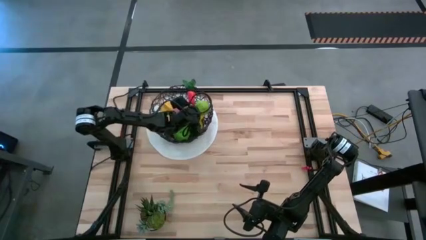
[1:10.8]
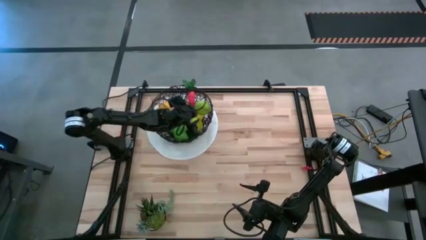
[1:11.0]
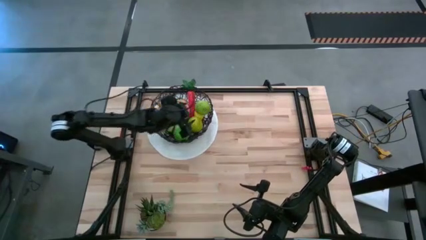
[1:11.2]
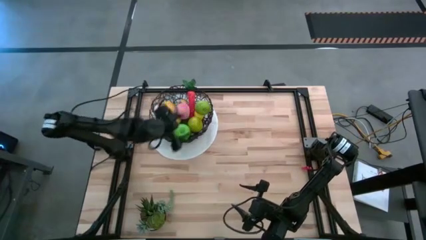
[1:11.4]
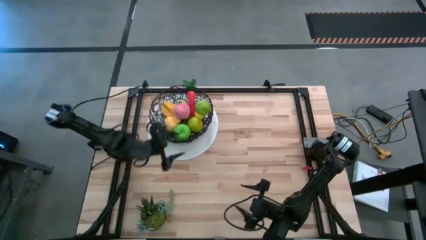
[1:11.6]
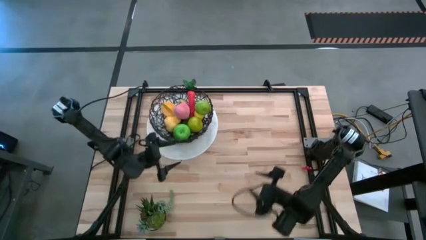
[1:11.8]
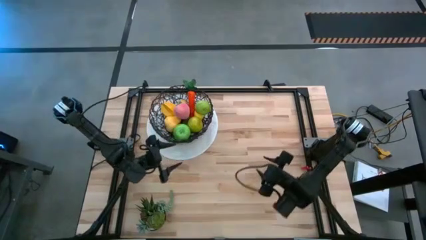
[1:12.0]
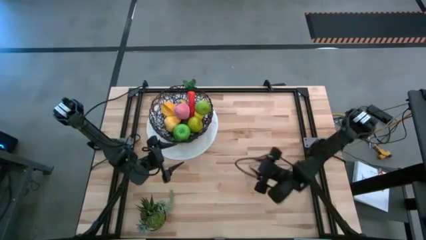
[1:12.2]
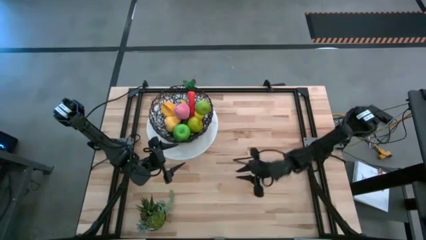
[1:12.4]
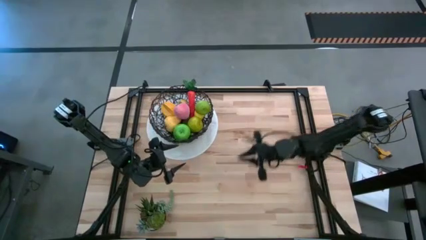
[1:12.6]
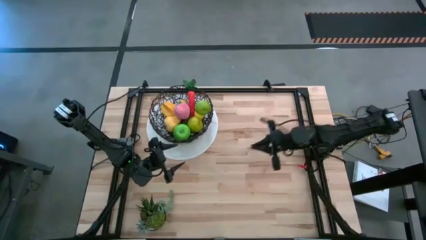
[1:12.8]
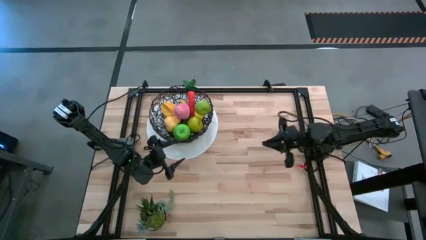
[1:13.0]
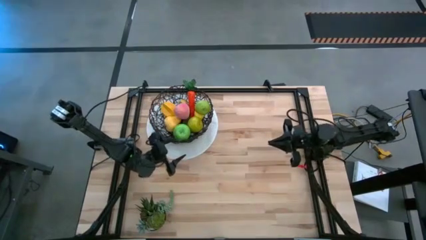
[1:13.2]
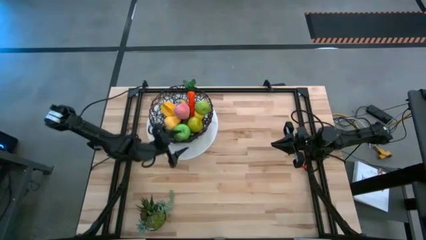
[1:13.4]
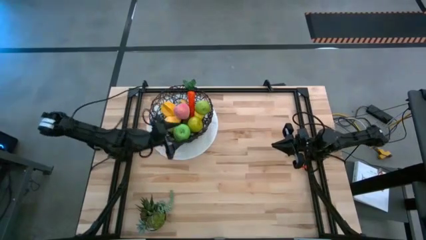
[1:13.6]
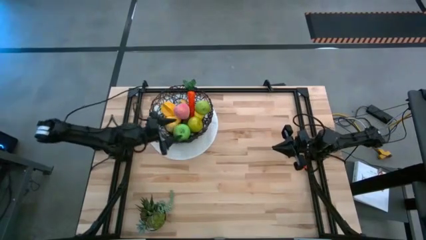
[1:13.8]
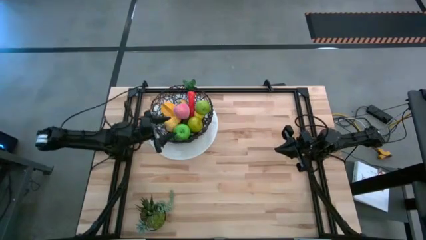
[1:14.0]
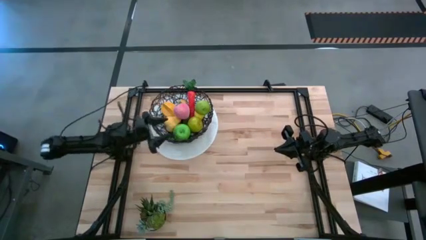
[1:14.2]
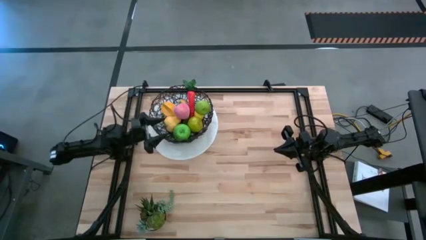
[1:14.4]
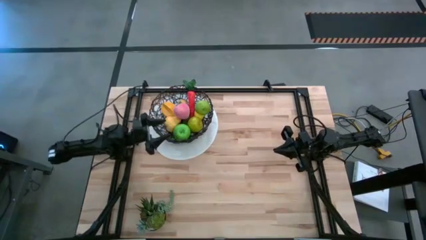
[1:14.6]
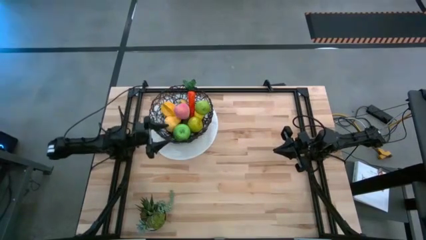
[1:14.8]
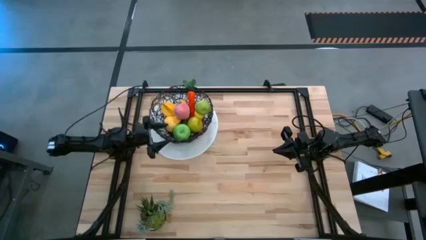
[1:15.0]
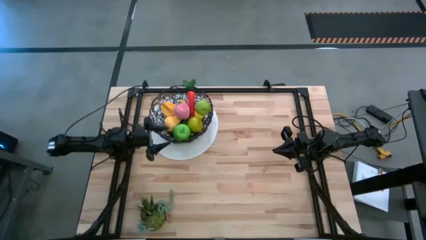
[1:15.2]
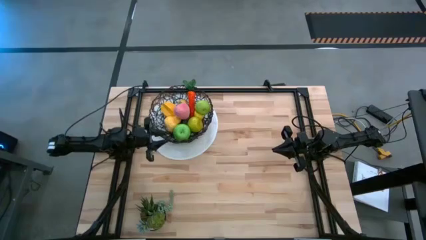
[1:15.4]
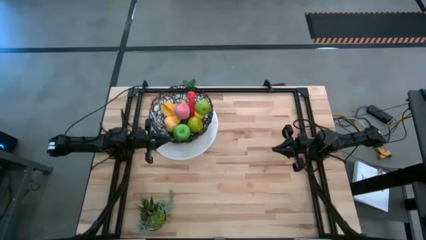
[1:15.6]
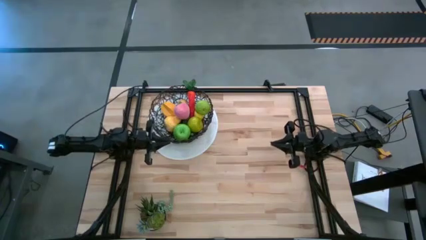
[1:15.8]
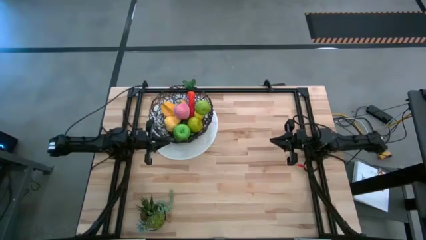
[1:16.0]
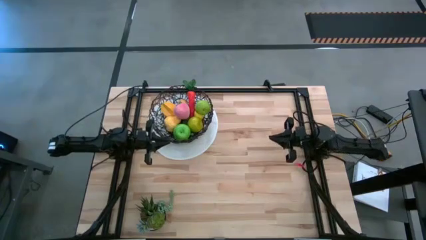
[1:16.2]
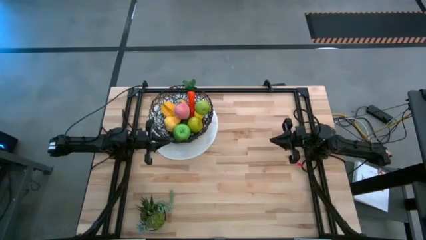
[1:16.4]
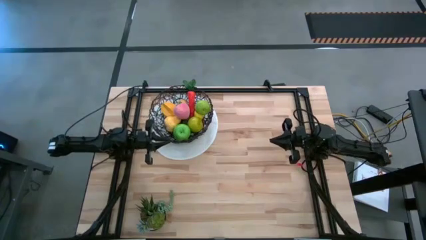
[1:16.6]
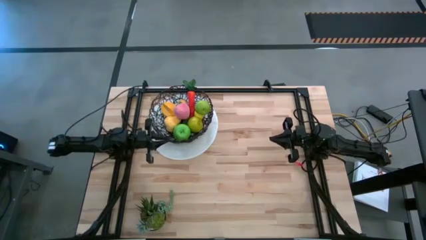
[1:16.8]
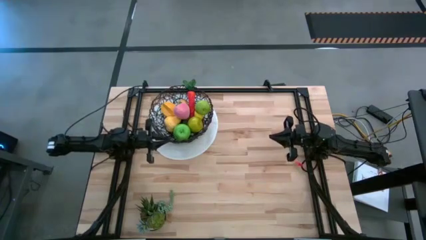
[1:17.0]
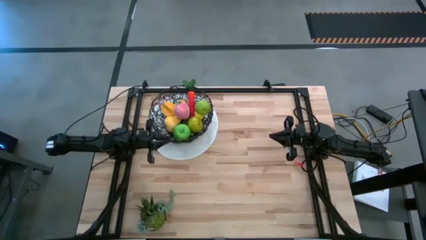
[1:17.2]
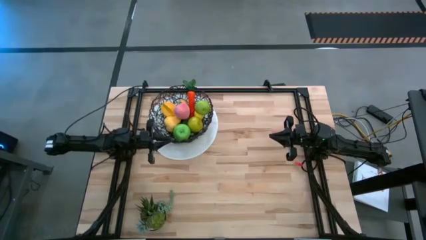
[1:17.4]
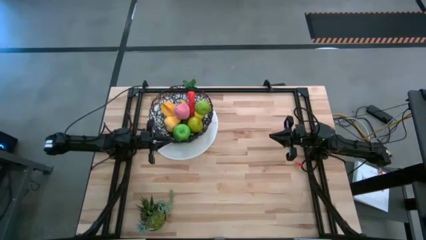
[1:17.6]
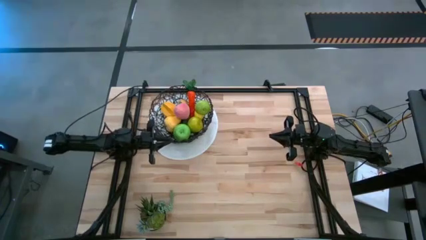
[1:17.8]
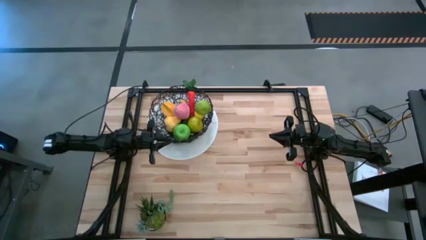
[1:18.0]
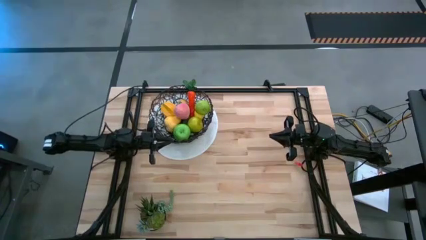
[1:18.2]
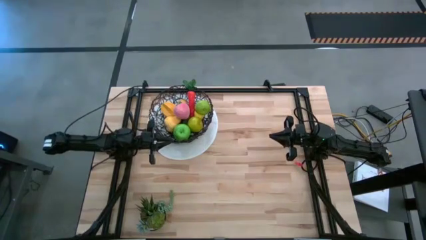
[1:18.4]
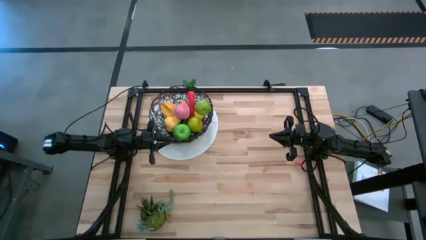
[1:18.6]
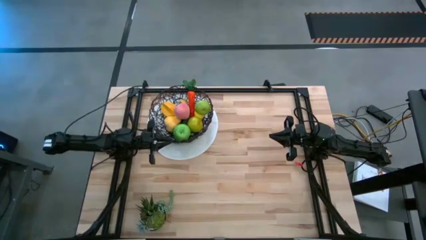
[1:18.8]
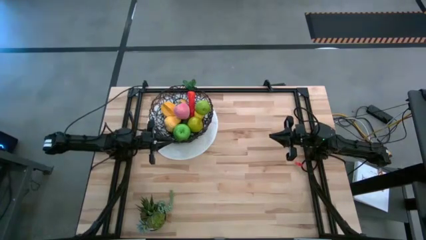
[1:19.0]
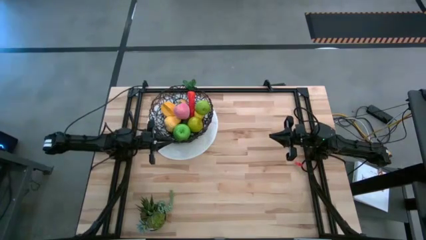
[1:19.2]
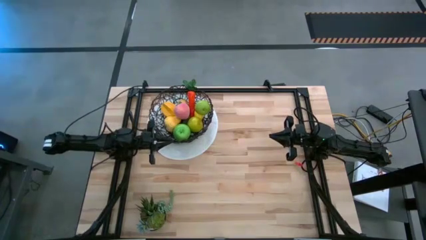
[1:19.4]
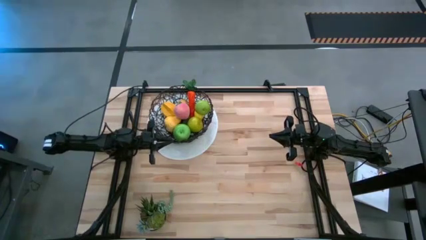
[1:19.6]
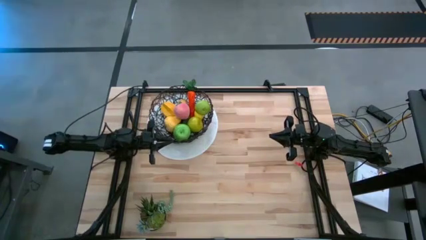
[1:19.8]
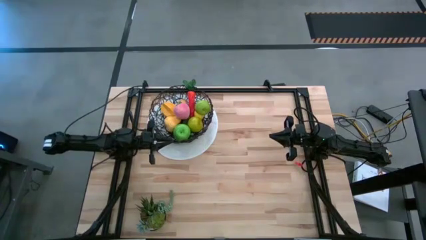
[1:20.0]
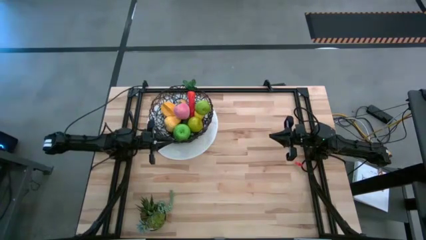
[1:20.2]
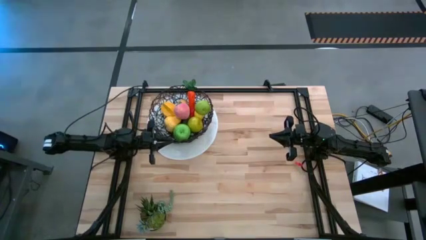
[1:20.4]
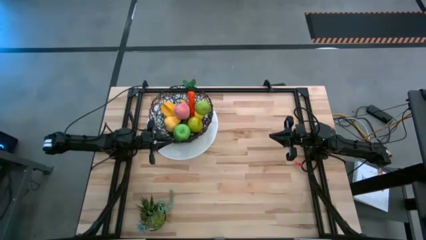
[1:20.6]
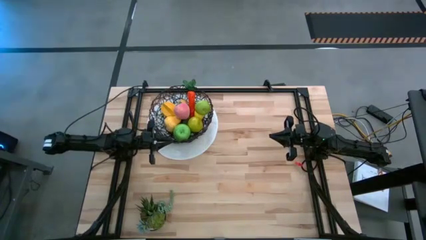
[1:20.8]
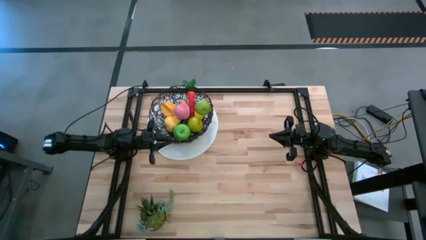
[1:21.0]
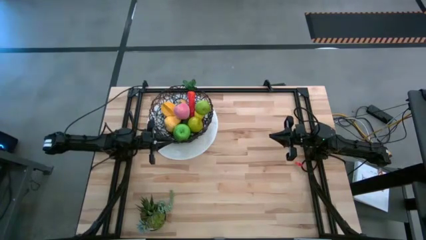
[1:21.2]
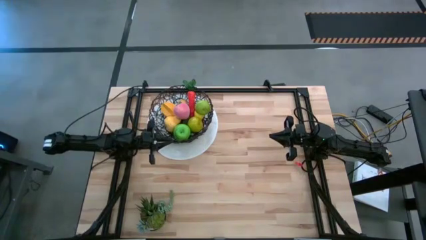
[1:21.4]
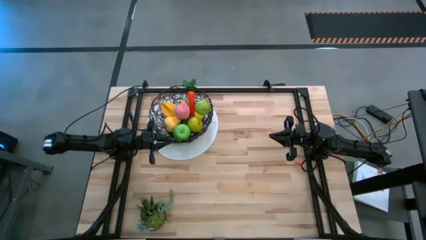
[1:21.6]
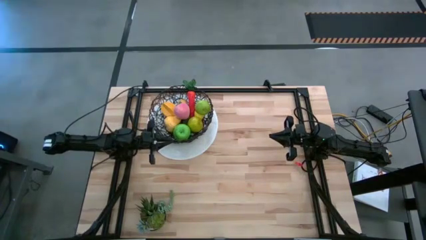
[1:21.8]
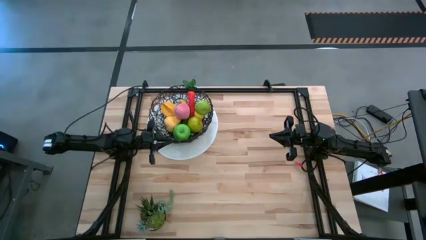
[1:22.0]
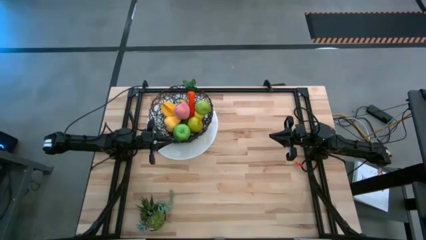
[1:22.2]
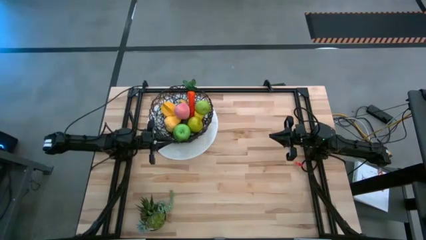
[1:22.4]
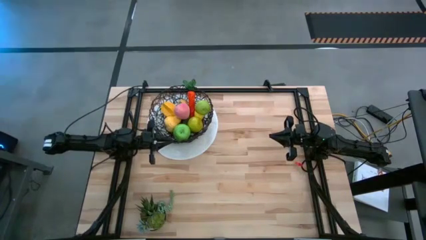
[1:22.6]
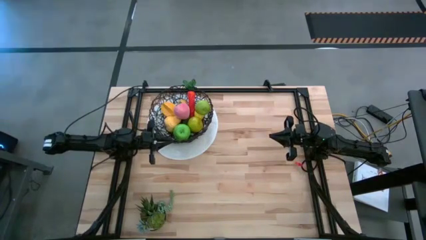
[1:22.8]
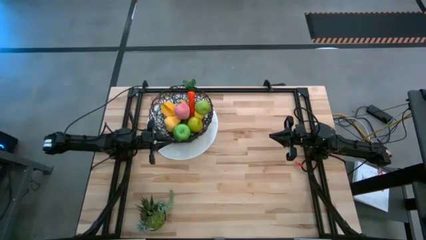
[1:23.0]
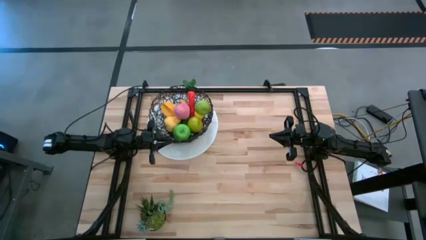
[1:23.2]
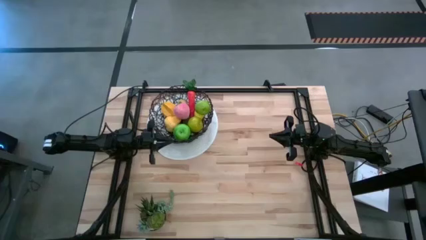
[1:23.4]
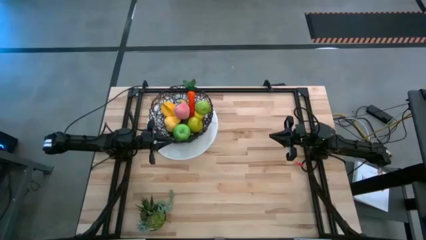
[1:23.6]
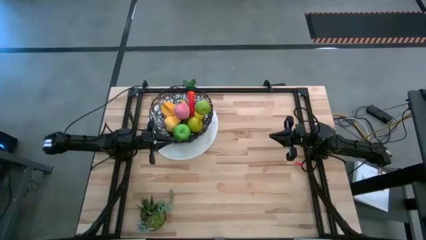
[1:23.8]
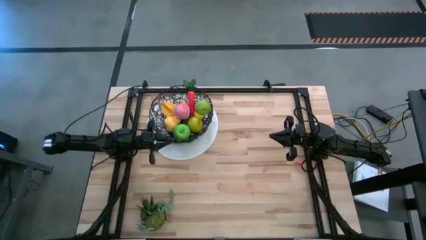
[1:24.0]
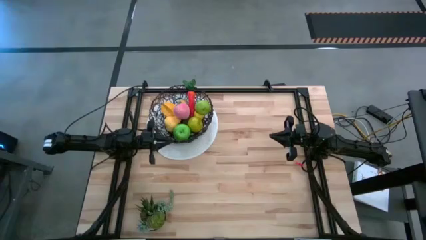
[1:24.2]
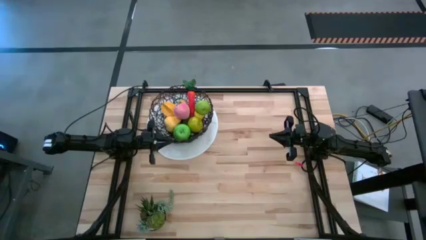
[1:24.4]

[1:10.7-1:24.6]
Task: Build produce basket
Return to Home Position

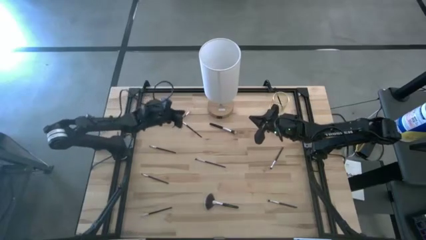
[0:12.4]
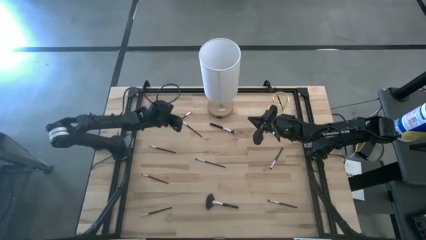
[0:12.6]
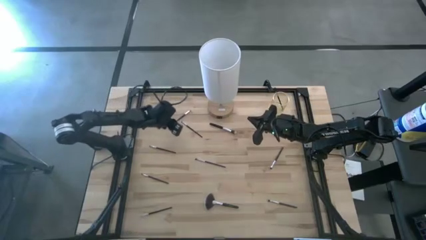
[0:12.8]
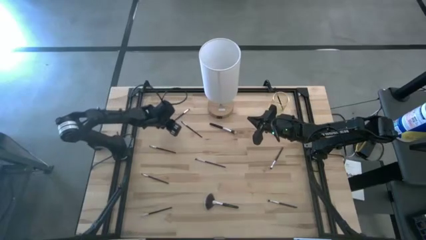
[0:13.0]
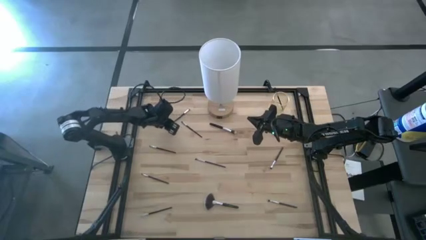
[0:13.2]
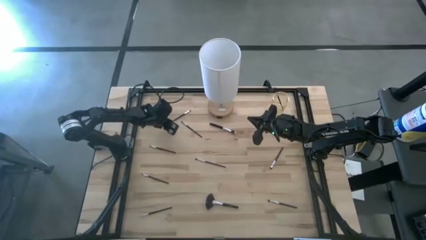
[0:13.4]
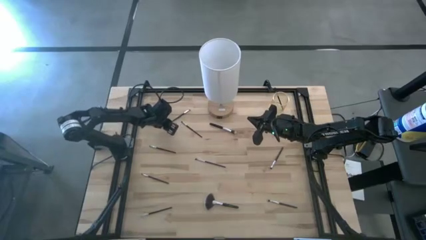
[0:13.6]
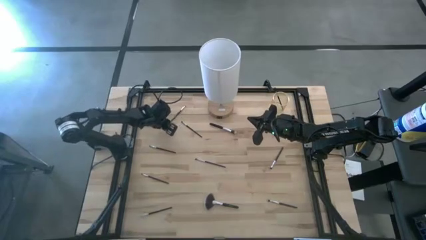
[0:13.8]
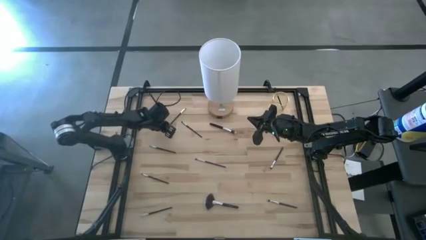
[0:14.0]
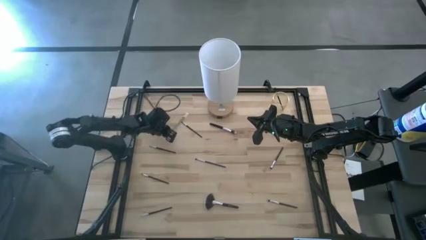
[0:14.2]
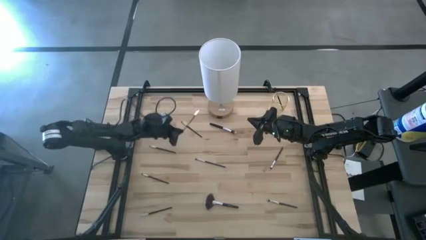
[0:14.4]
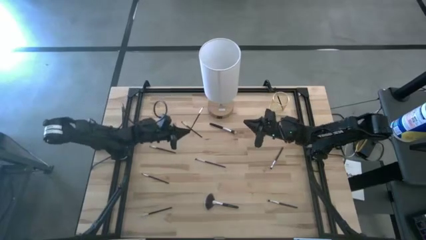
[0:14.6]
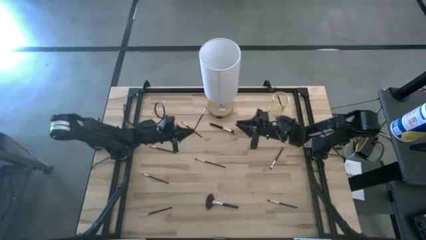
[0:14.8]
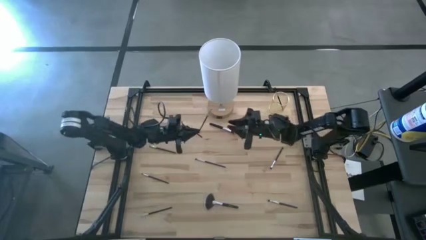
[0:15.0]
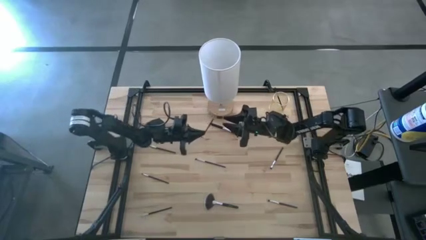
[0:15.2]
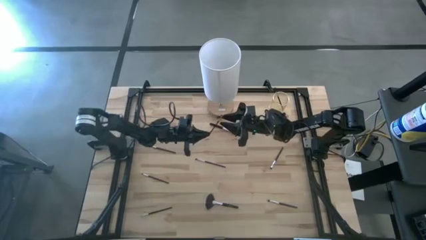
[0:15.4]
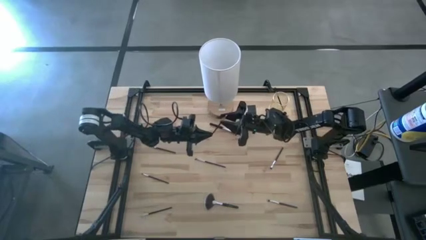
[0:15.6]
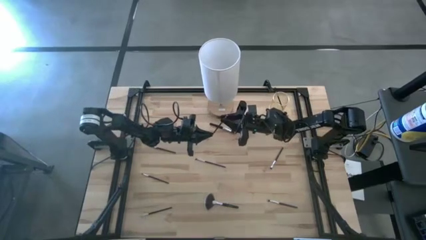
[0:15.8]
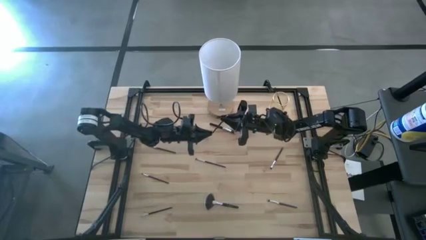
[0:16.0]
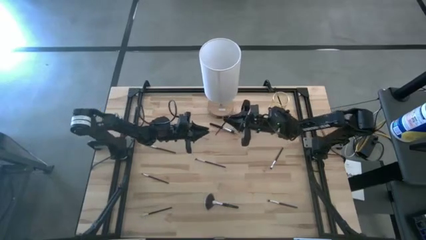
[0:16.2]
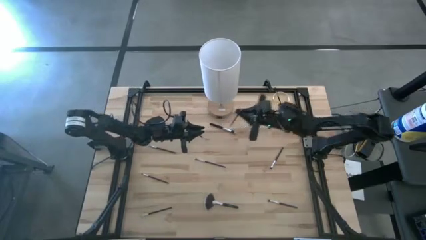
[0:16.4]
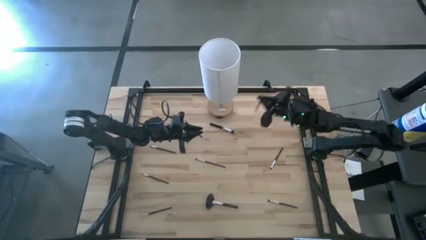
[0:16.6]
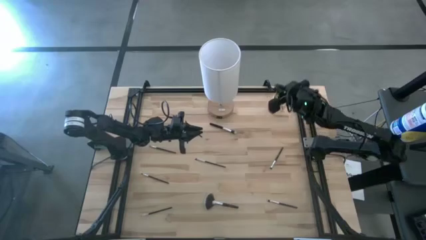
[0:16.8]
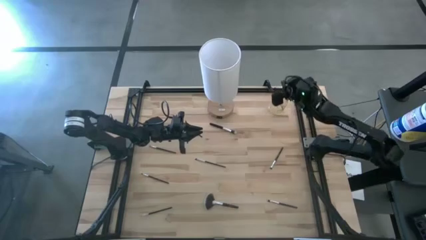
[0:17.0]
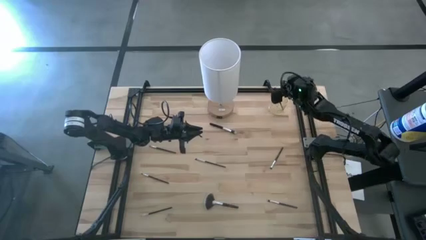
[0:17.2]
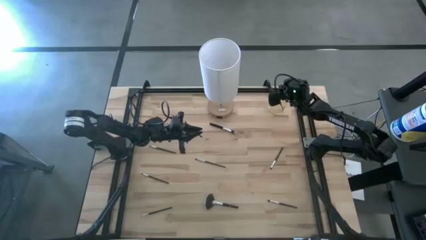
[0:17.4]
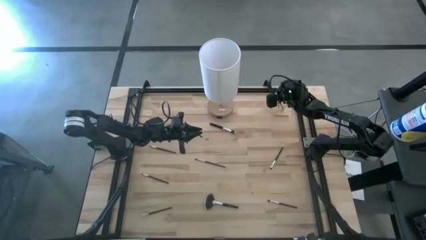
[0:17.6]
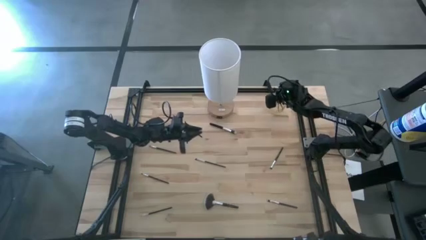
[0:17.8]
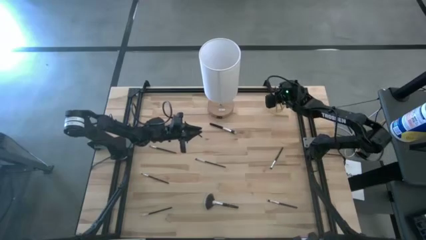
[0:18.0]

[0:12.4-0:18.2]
Task: Pick & Place Makeup Brushes
Put the eyeshadow brush into the makeup brush holder
